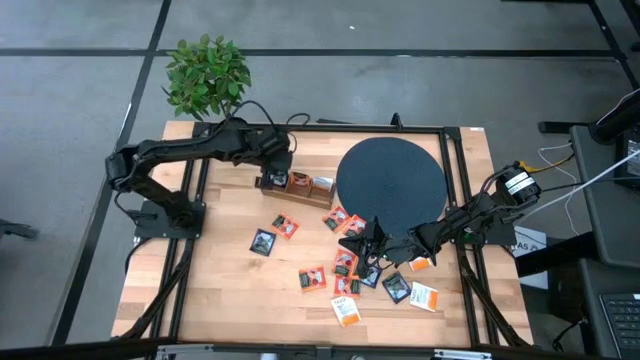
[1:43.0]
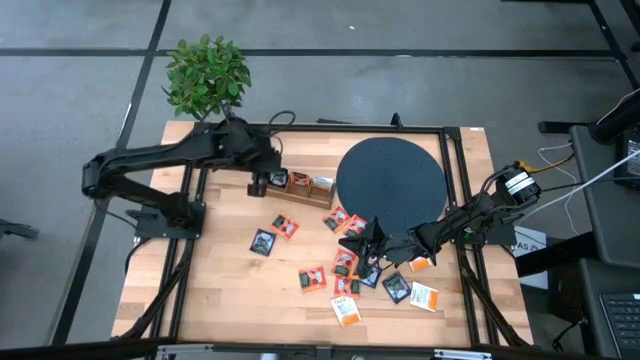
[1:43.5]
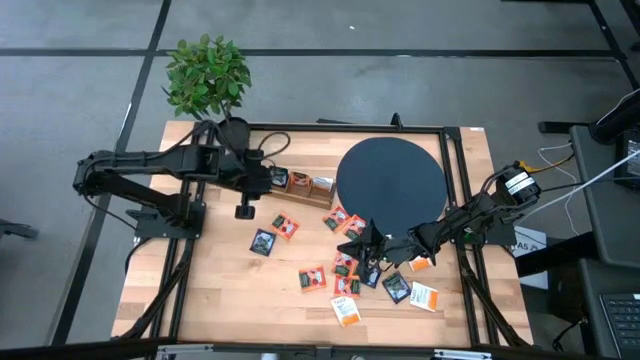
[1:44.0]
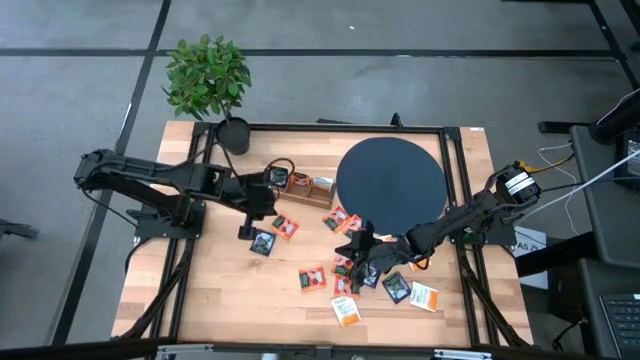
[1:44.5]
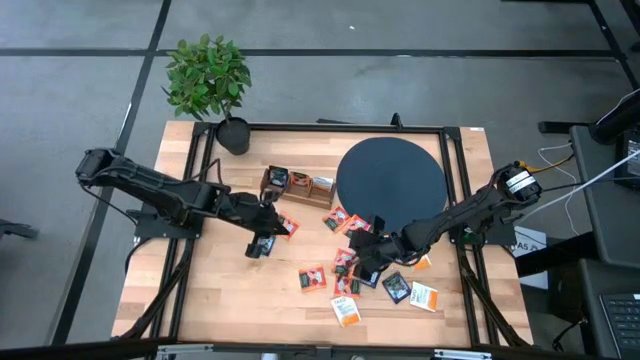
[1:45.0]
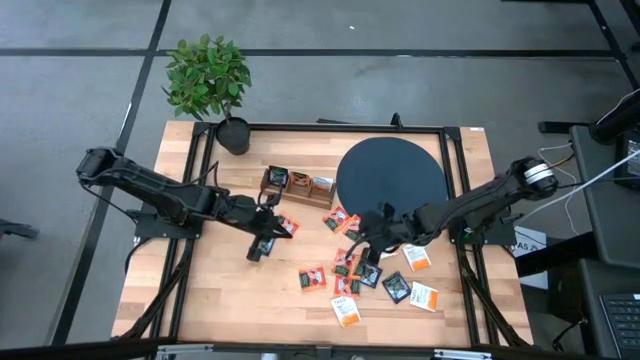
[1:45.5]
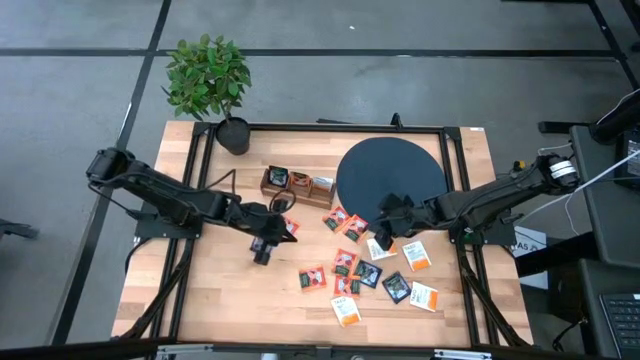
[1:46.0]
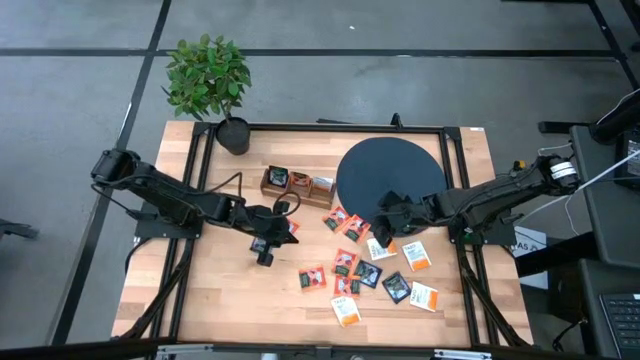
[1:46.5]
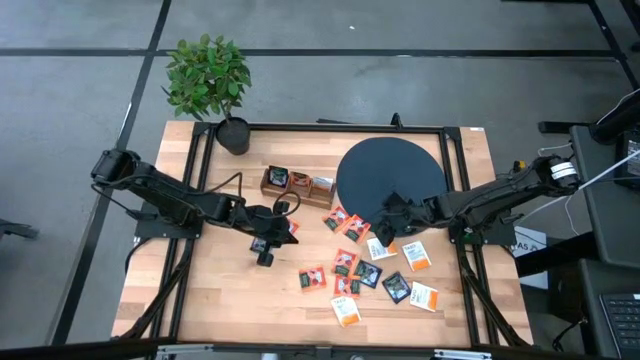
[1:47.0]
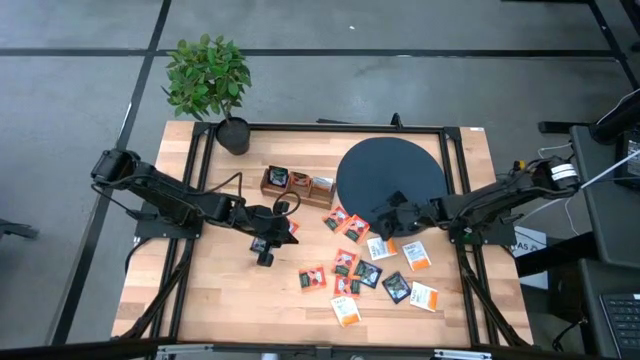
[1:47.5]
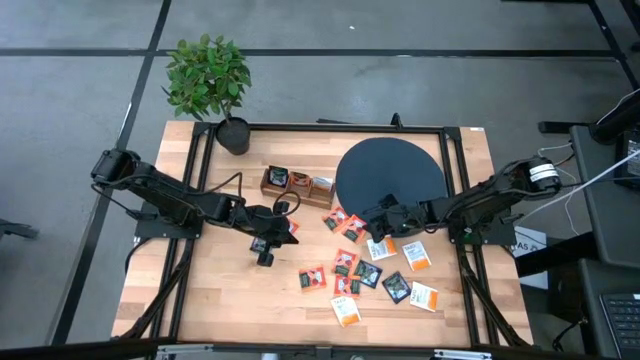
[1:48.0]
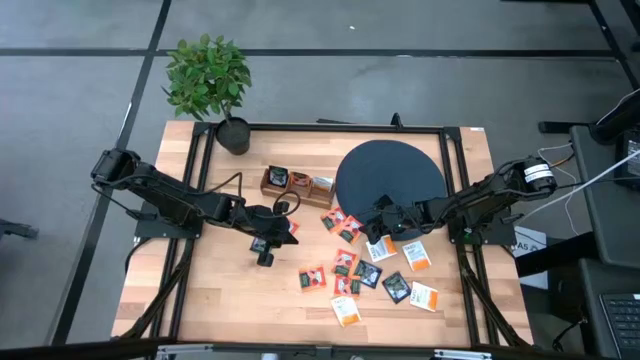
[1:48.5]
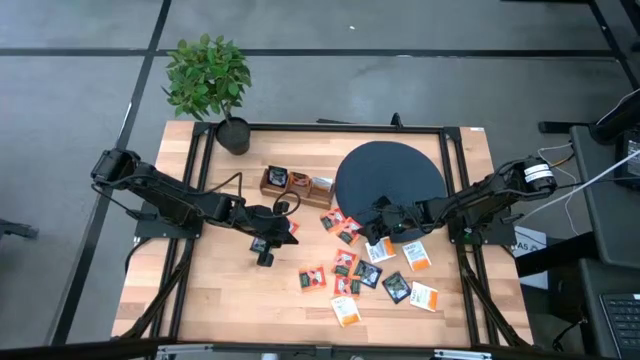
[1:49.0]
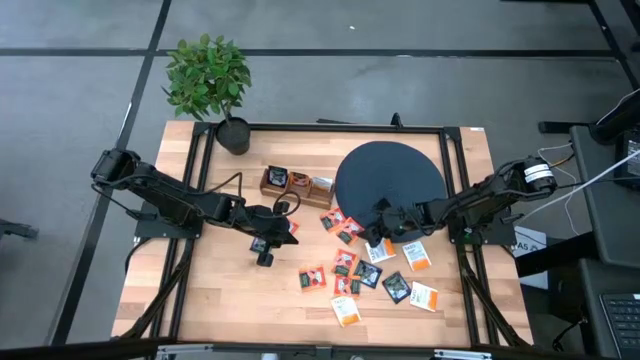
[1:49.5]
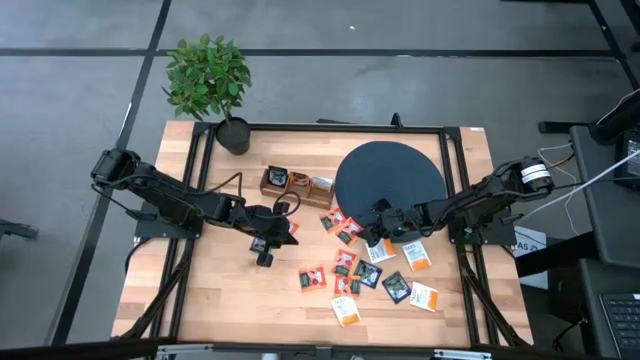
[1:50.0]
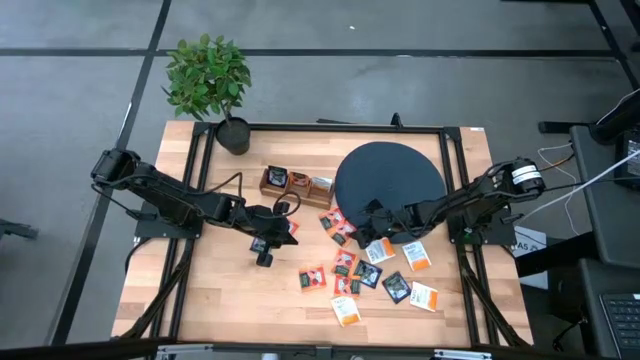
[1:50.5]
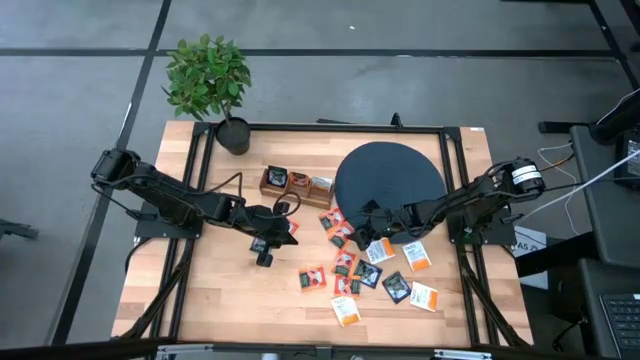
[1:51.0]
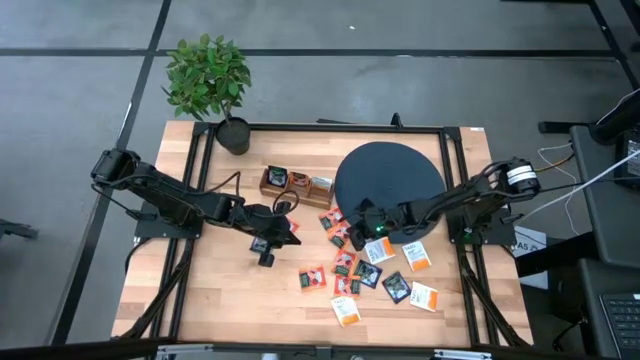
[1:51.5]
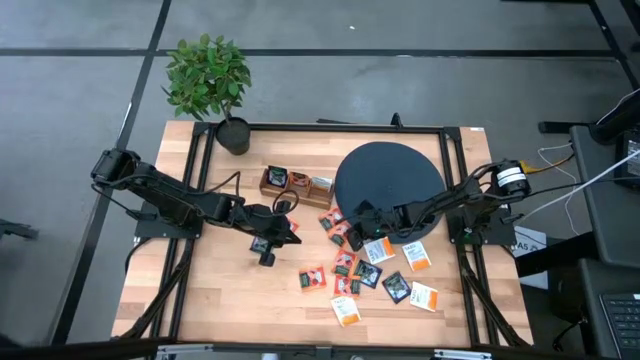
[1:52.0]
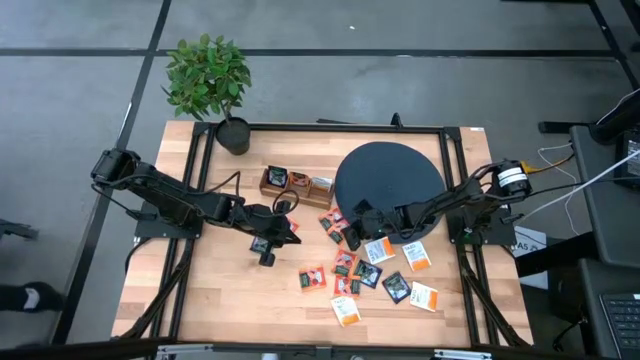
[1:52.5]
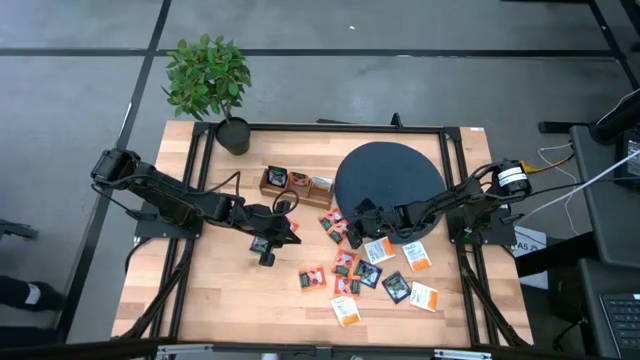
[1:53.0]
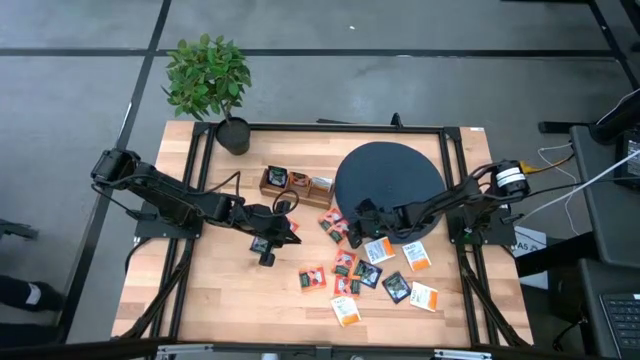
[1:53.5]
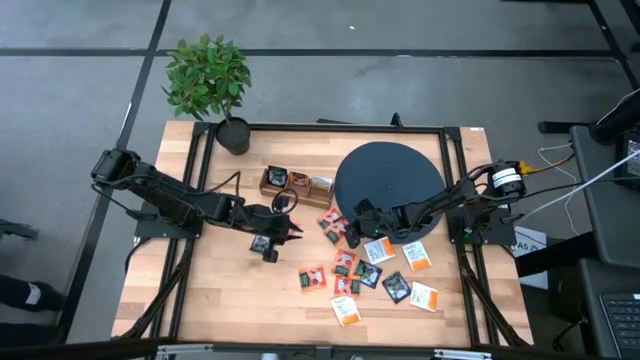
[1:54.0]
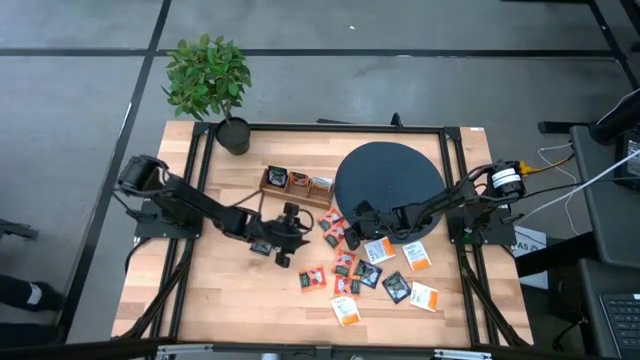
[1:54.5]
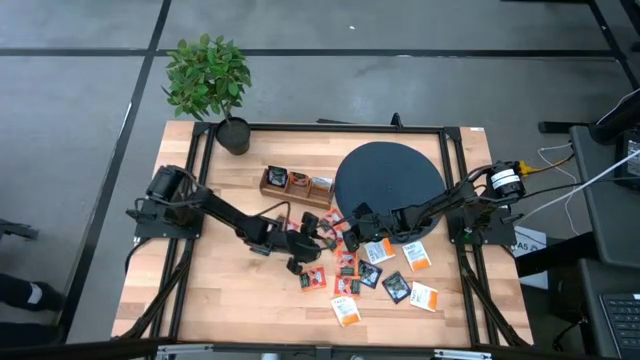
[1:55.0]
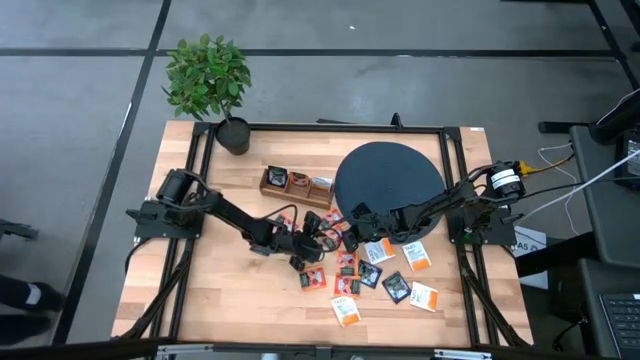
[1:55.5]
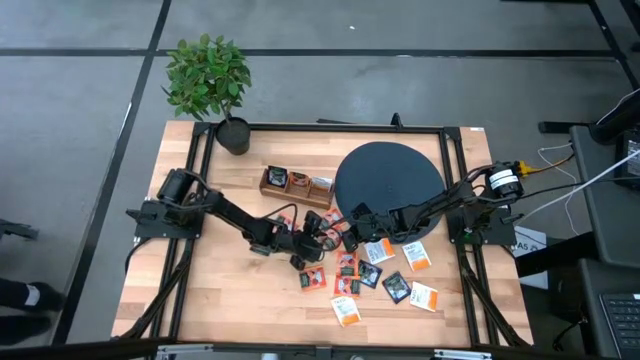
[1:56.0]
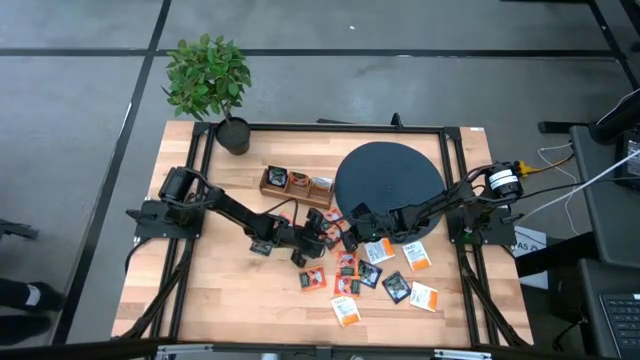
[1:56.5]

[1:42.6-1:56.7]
Task: Pick & Place Tea
Put the orange tea bag into the middle section of the wooden organizer

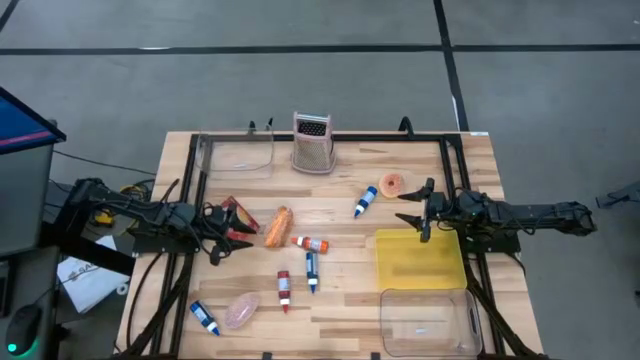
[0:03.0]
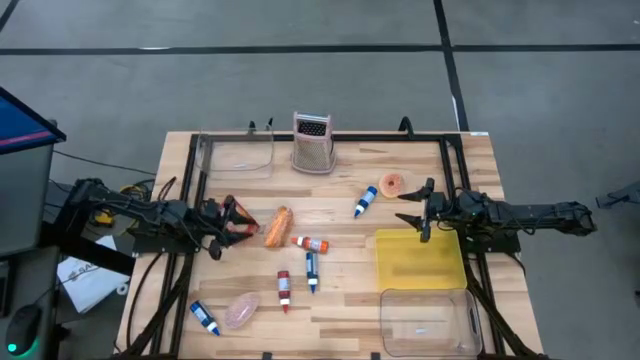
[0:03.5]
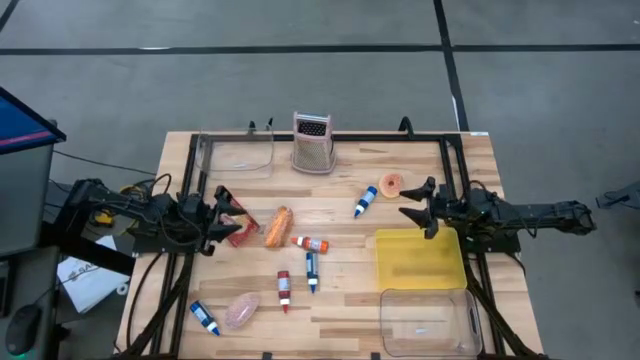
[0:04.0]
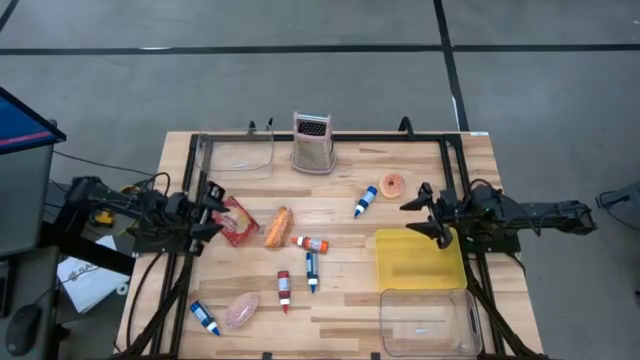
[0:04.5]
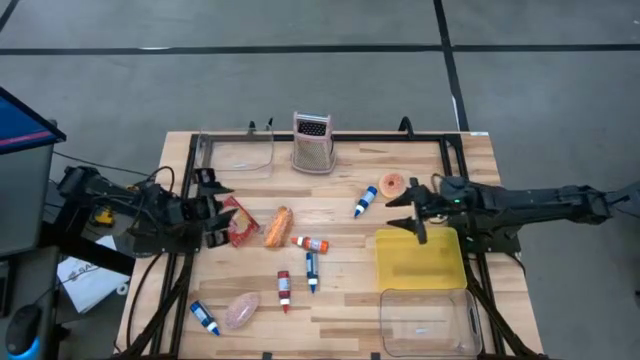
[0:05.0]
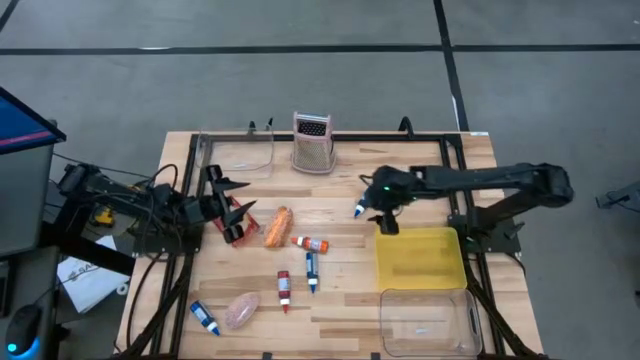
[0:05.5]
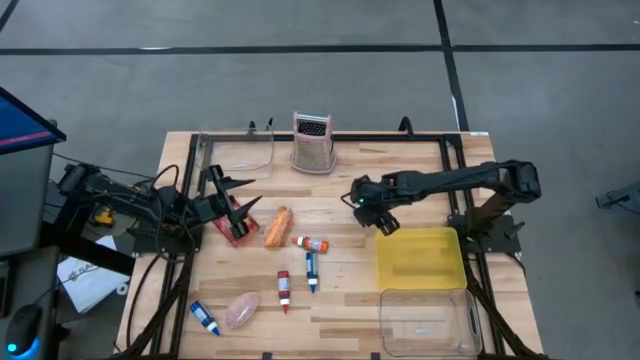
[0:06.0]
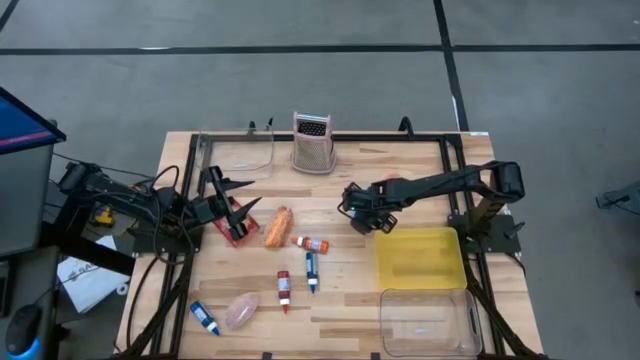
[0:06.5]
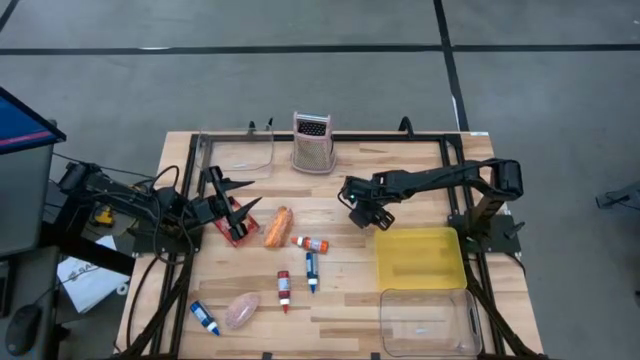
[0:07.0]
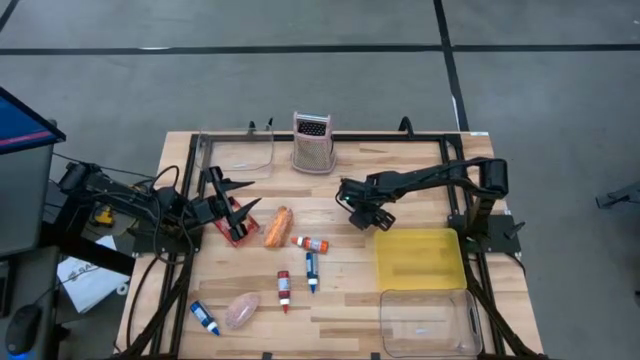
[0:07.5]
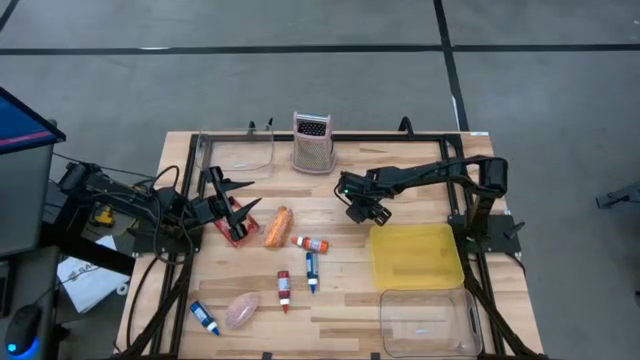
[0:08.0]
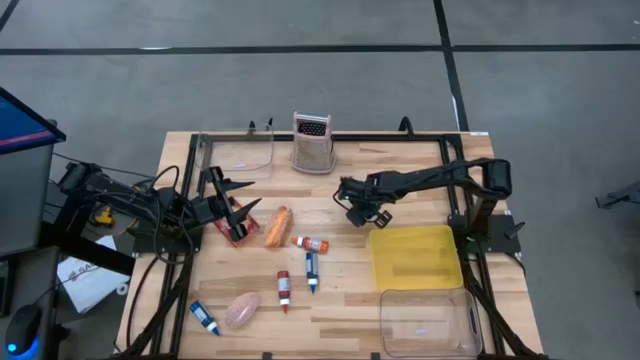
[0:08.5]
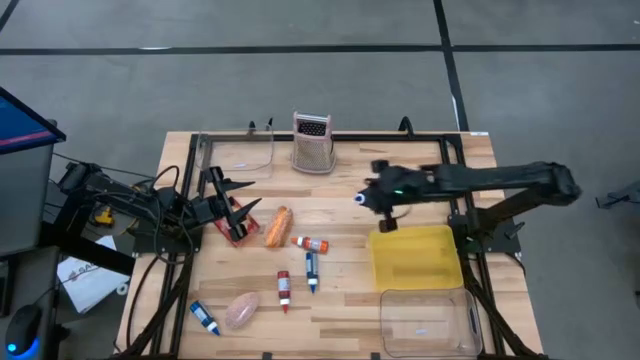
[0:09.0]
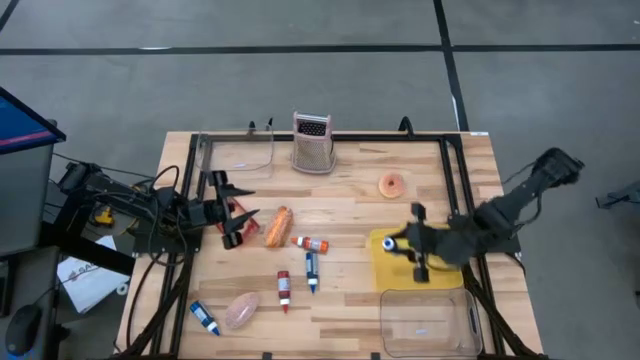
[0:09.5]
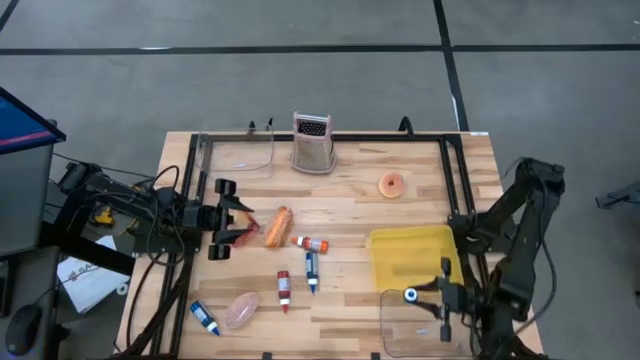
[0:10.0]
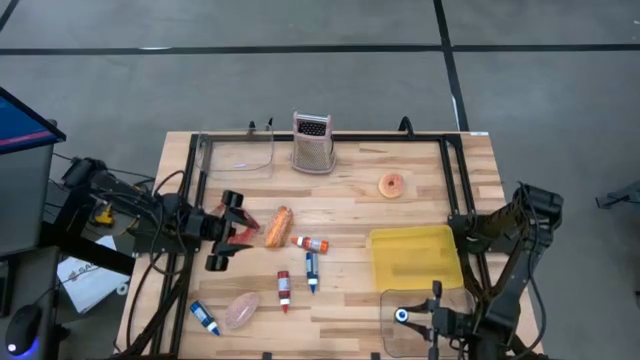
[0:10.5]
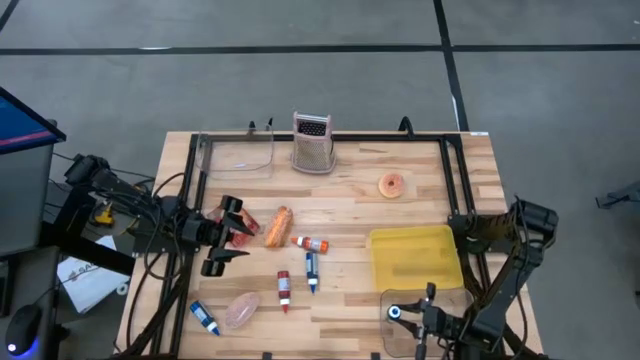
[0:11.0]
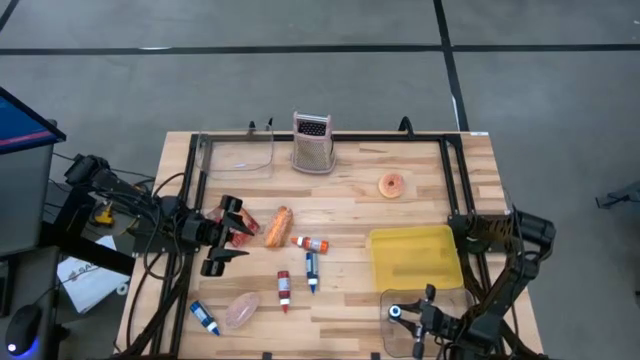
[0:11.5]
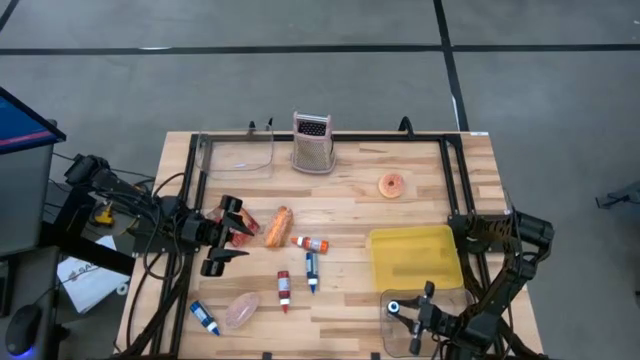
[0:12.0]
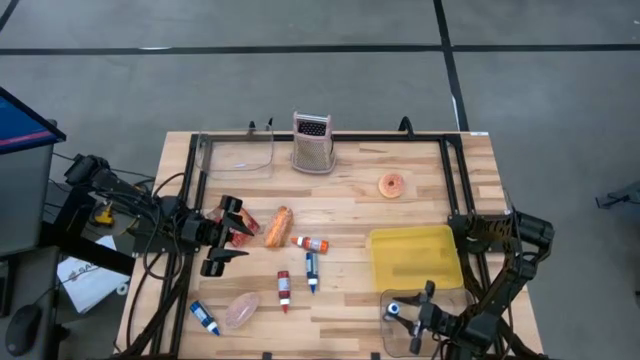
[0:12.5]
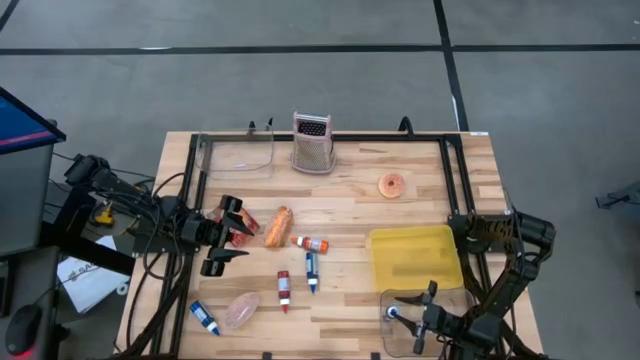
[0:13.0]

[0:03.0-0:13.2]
Task: Pick & Place Food Item
Put the top blue food coloring bottle into the bottom transparent bin
